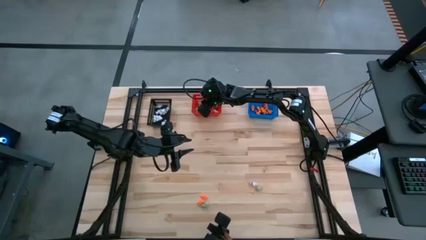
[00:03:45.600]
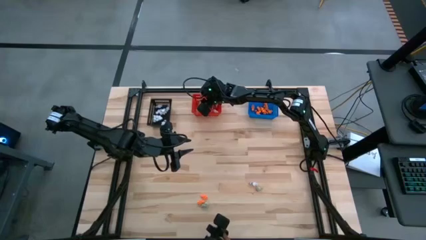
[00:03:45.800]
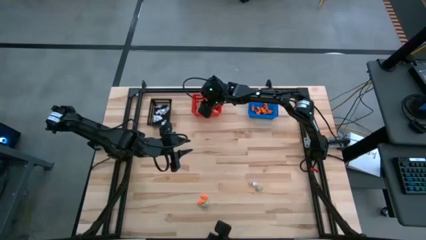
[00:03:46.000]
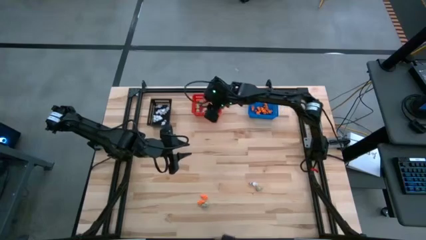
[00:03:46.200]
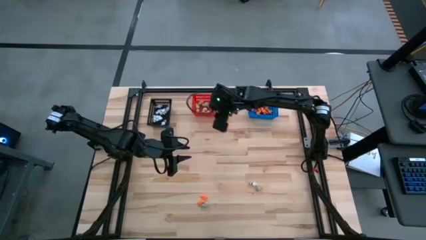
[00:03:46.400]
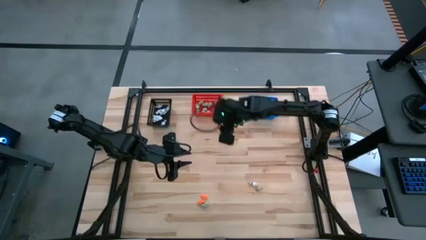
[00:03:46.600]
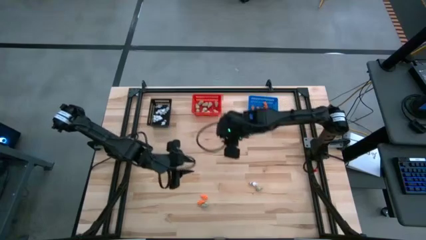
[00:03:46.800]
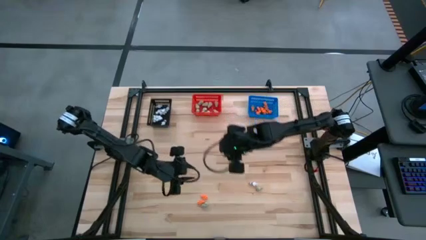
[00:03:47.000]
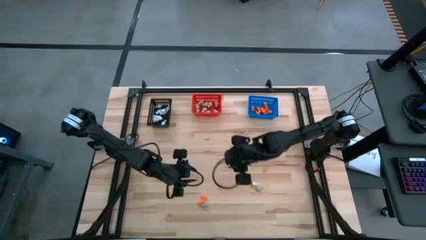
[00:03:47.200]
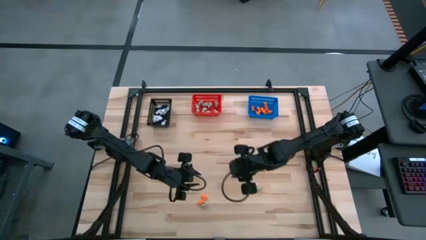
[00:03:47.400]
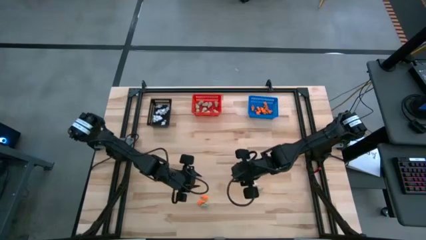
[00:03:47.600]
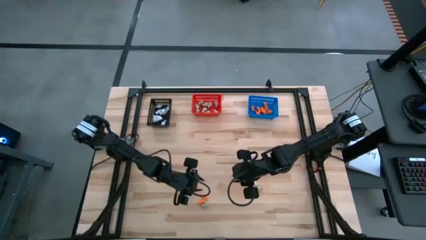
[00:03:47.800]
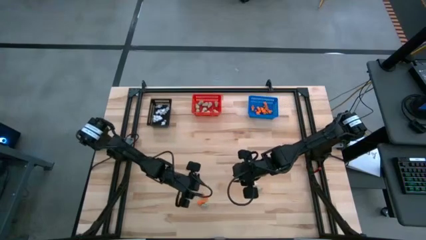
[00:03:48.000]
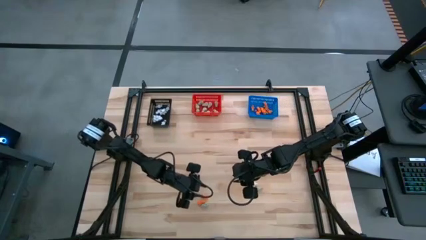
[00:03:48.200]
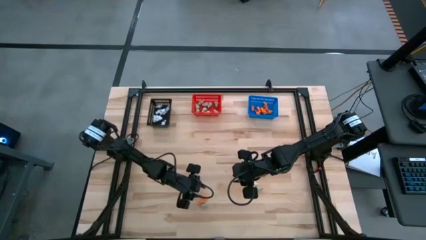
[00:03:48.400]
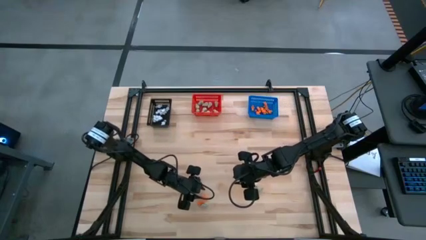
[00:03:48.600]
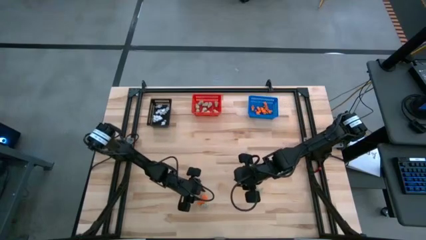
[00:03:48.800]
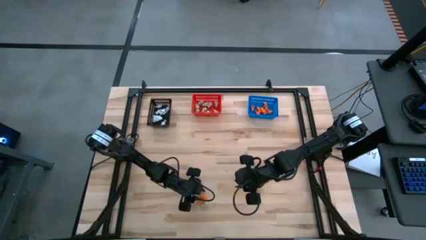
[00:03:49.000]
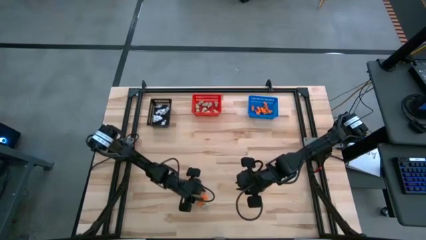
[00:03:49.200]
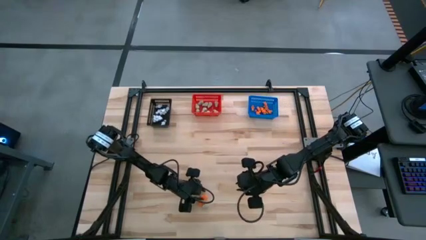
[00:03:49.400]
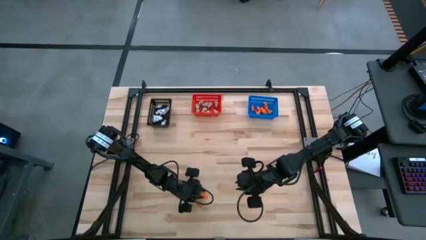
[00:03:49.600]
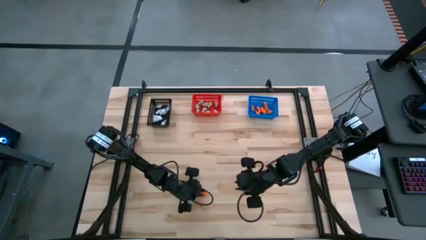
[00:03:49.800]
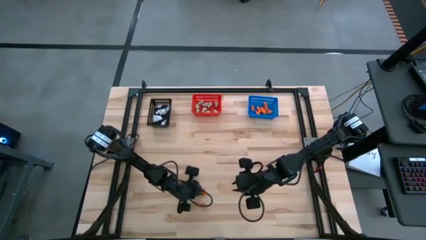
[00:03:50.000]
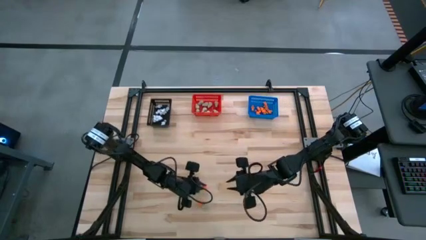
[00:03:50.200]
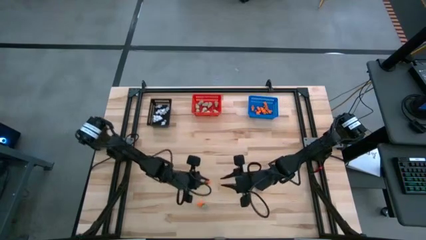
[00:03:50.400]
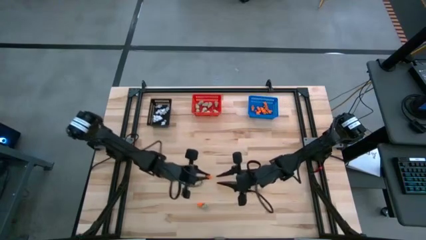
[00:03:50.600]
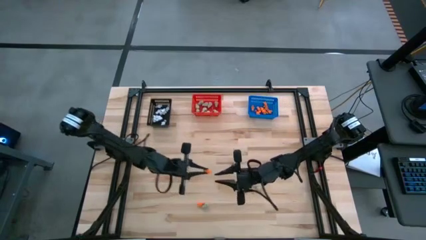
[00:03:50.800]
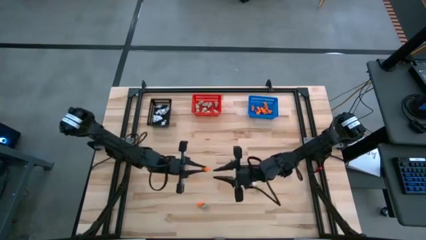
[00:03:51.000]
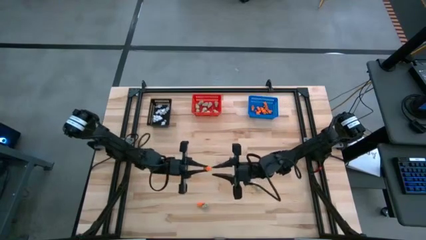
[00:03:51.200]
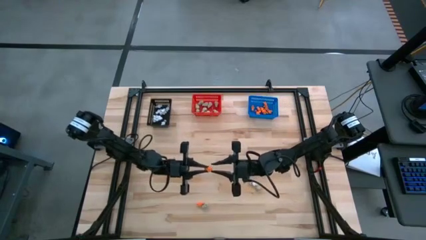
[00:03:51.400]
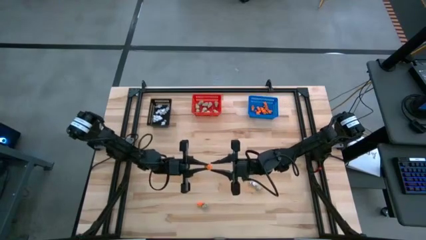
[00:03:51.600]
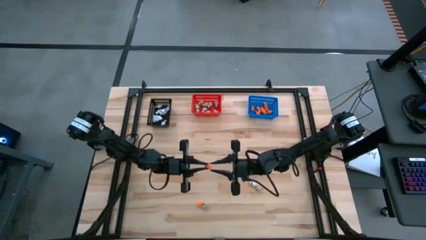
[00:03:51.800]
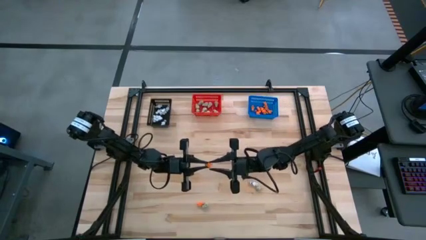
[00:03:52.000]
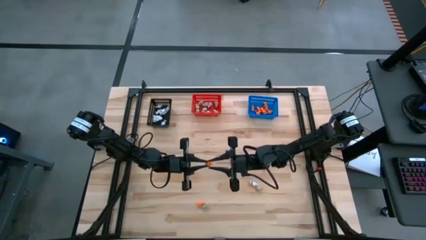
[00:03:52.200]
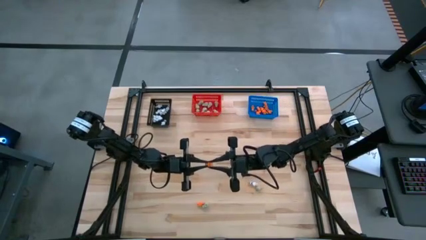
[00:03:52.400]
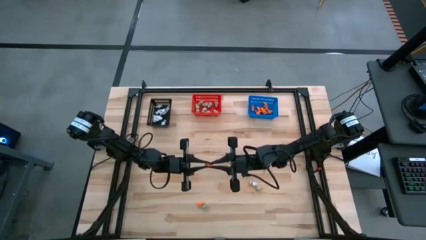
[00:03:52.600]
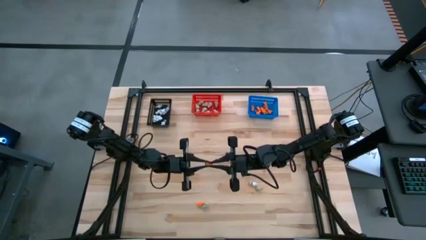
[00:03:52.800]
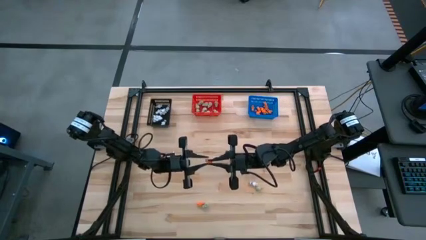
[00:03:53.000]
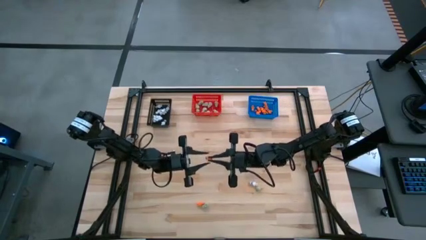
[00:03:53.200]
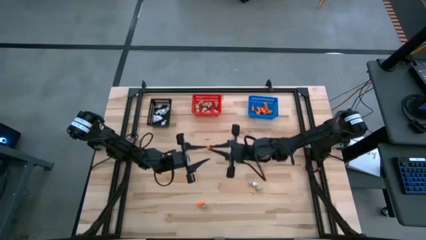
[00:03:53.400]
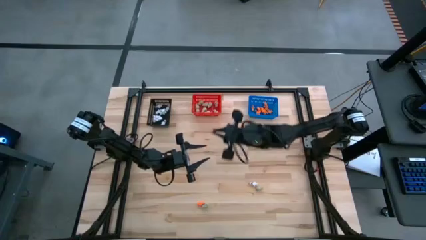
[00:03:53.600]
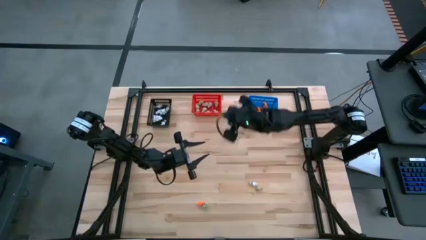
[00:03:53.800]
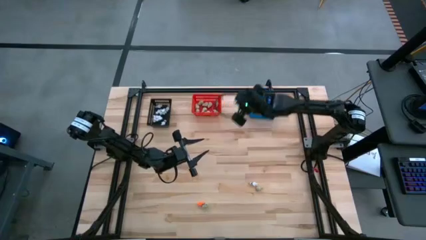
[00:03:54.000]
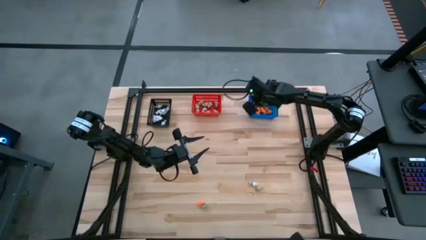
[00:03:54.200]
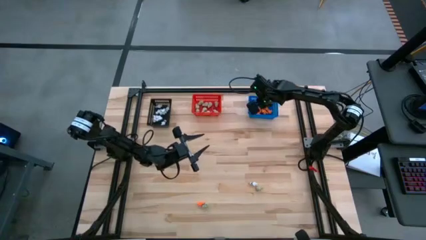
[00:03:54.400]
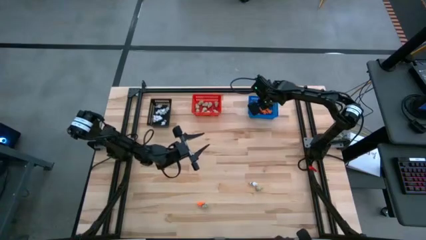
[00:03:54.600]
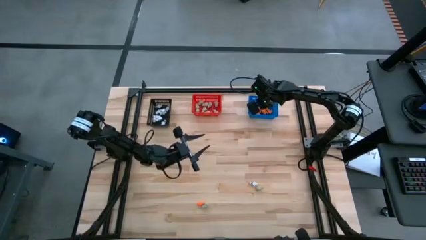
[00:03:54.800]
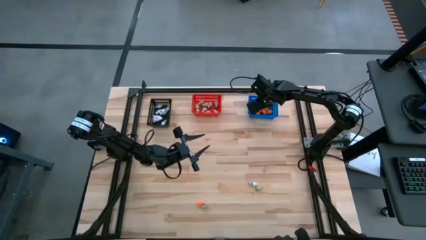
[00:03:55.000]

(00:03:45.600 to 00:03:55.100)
Task: Sort Halloween decoration
Put the orange skeleton toy into the blue bin

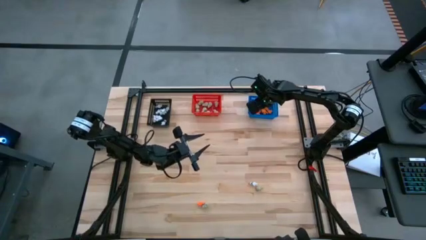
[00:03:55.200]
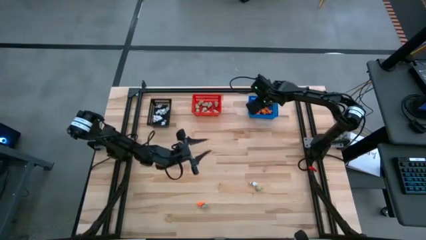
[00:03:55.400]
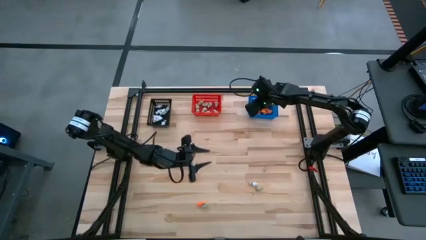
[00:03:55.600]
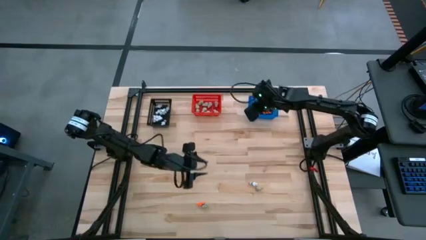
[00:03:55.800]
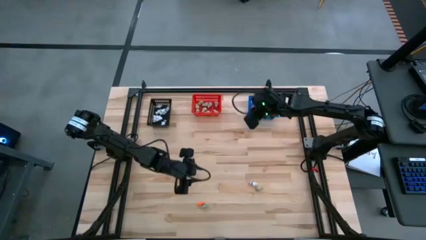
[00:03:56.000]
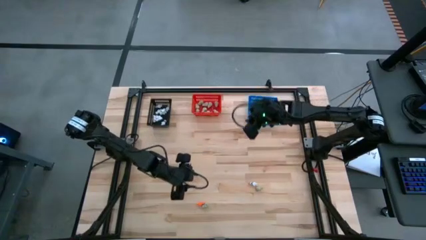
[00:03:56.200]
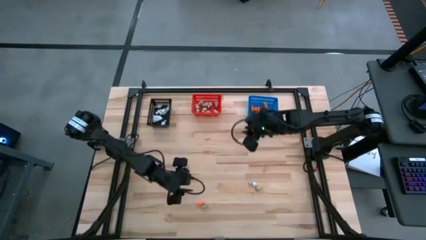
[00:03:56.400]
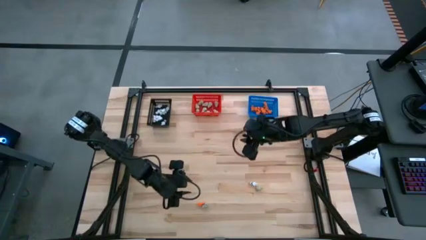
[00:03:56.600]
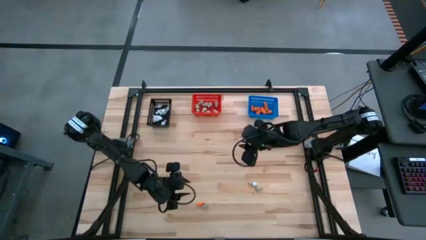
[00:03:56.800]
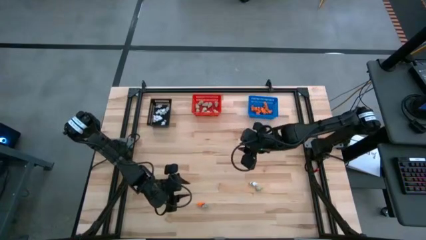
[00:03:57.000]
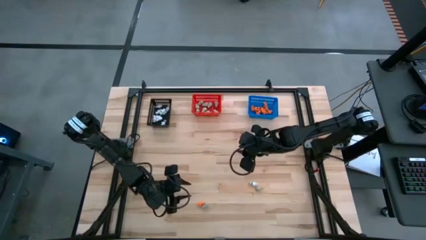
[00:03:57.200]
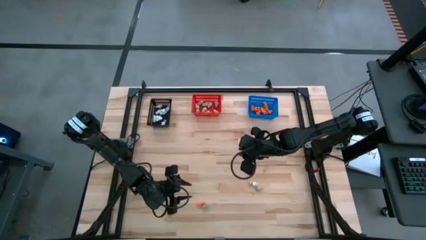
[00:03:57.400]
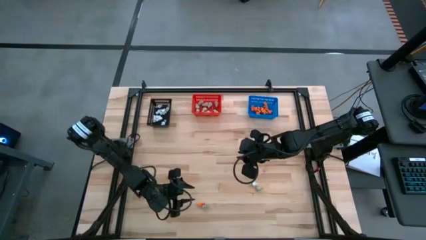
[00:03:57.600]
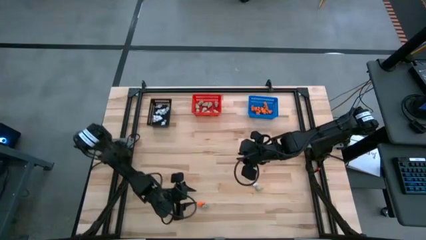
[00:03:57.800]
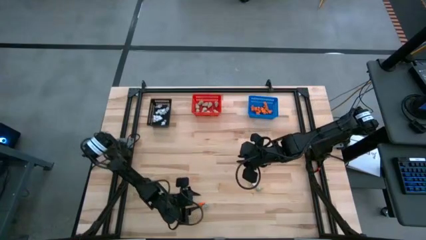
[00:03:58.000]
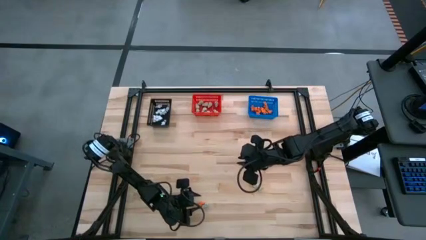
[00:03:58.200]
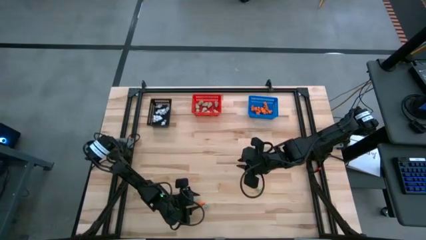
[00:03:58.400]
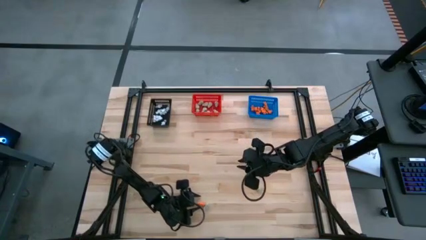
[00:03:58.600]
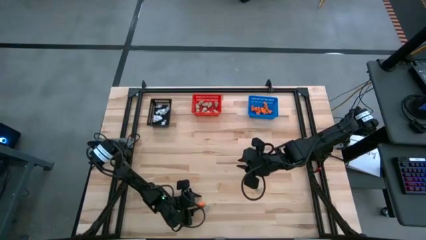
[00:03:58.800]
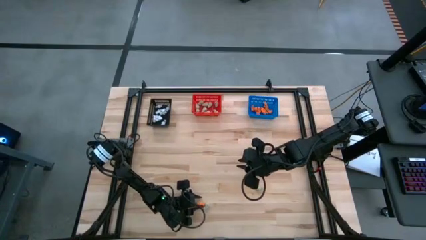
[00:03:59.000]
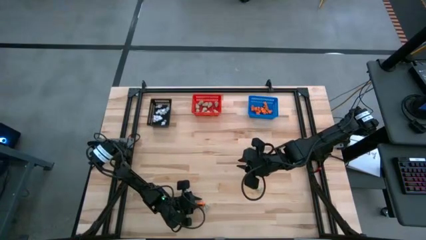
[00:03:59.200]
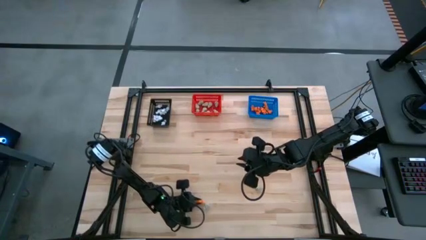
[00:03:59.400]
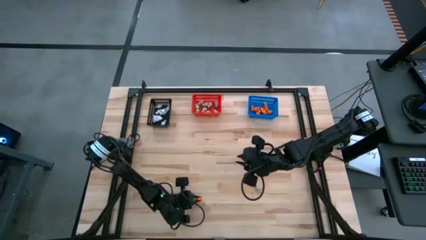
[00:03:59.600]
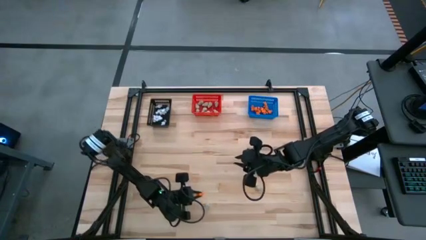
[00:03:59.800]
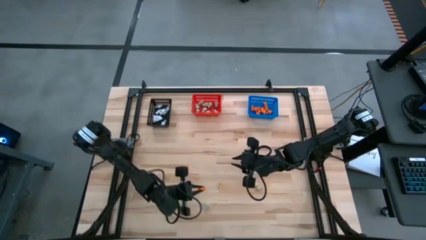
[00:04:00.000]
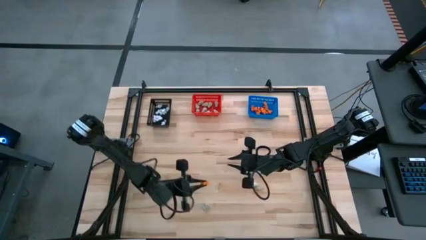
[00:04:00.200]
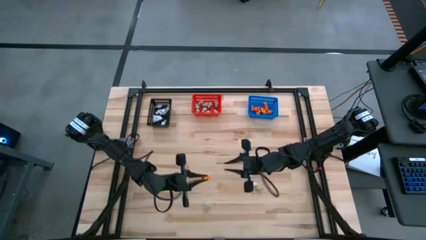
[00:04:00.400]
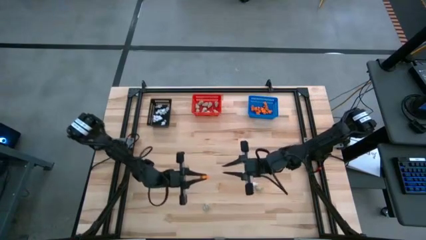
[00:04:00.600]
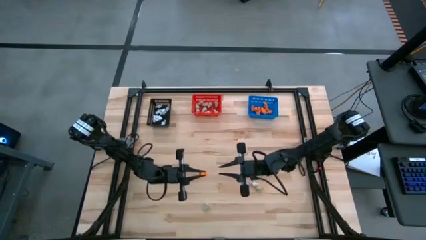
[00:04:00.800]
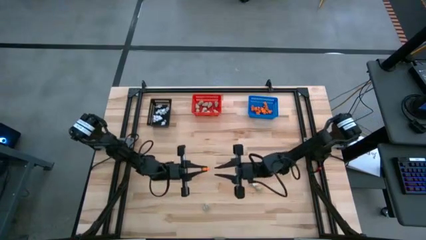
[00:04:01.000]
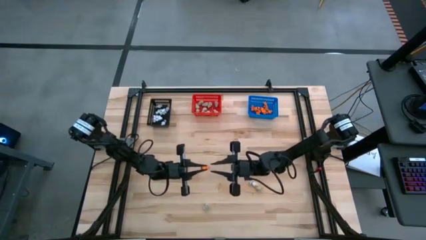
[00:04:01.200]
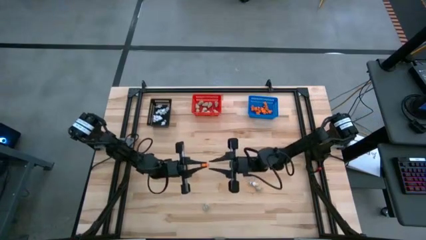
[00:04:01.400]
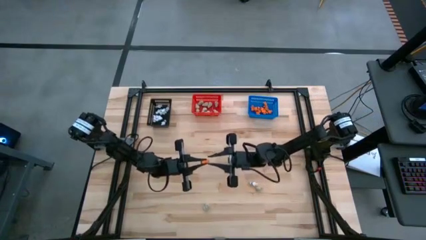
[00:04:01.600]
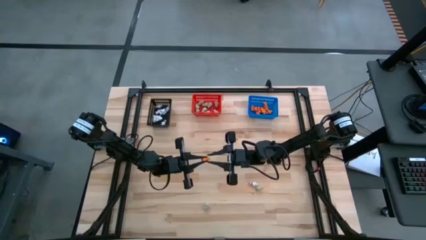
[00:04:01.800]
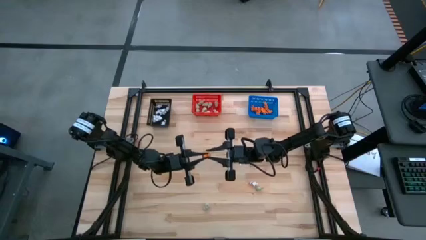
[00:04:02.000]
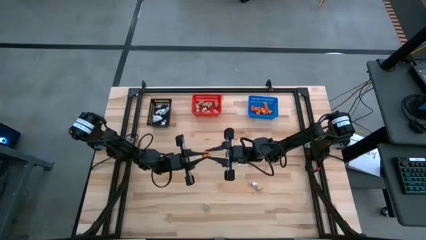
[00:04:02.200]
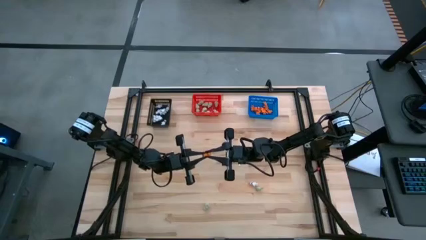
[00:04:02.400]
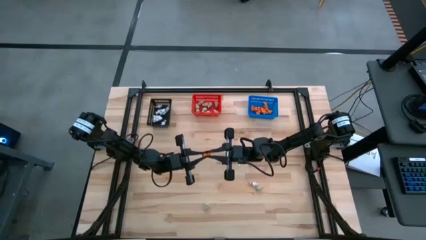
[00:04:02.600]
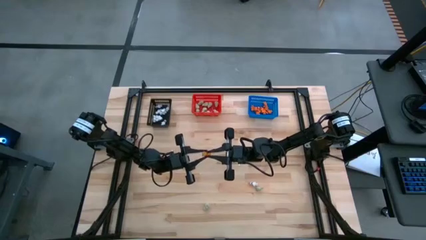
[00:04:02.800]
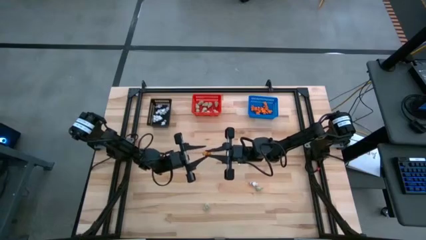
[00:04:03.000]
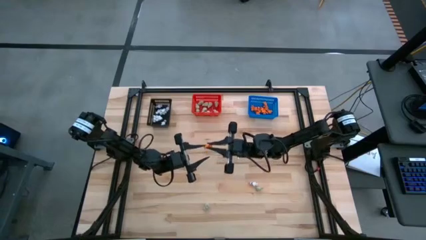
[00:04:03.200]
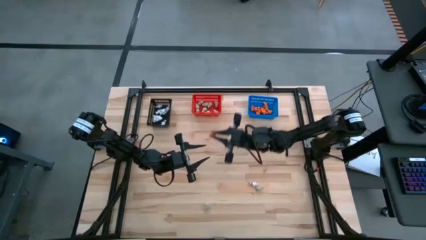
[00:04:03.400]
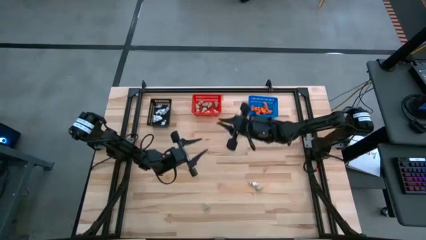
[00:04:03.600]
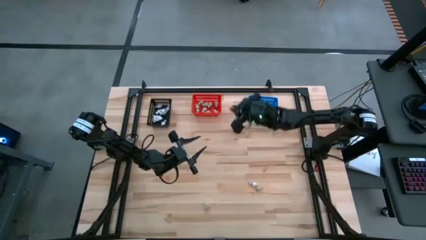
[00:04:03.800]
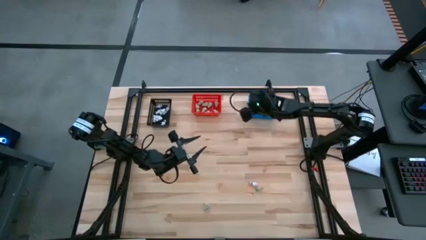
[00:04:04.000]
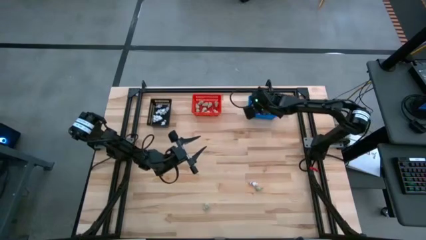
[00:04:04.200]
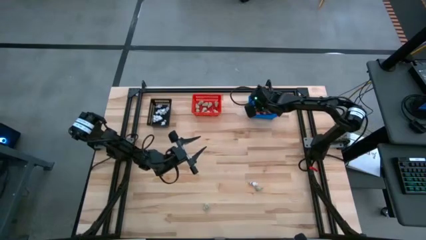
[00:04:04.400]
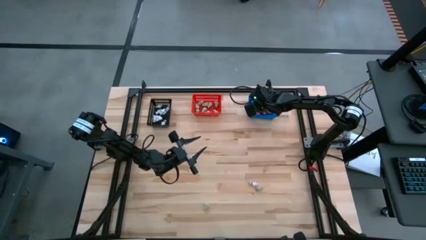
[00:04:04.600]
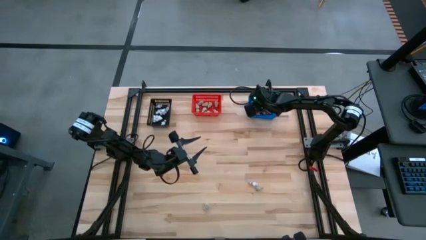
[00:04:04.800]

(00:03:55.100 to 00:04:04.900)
Put the orange skeleton toy into the blue bin
